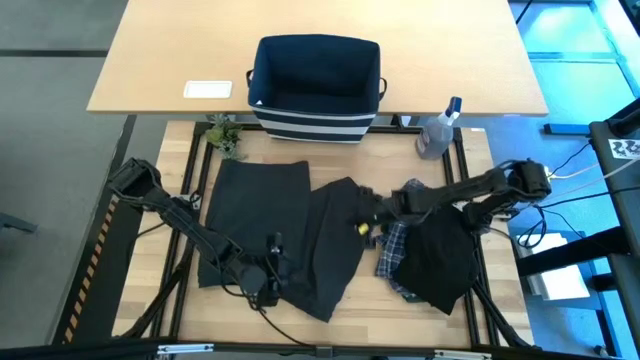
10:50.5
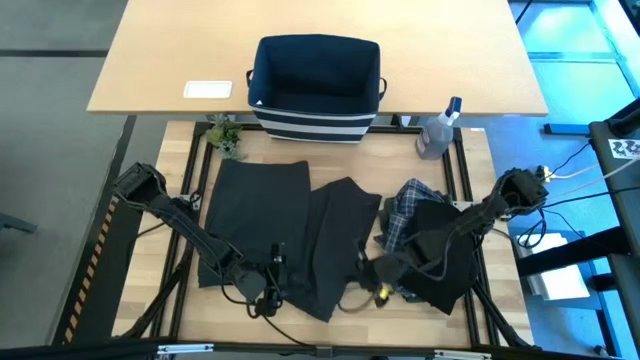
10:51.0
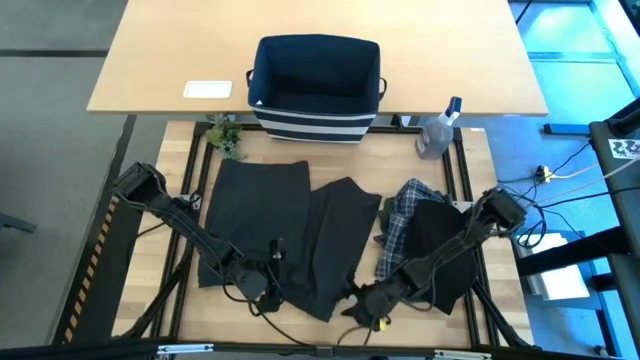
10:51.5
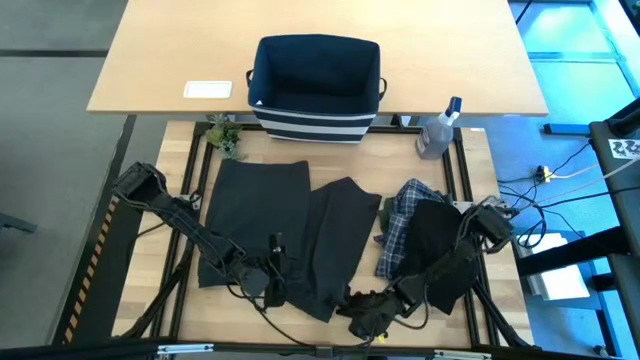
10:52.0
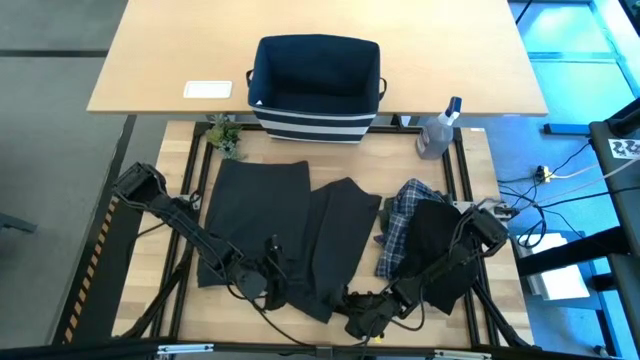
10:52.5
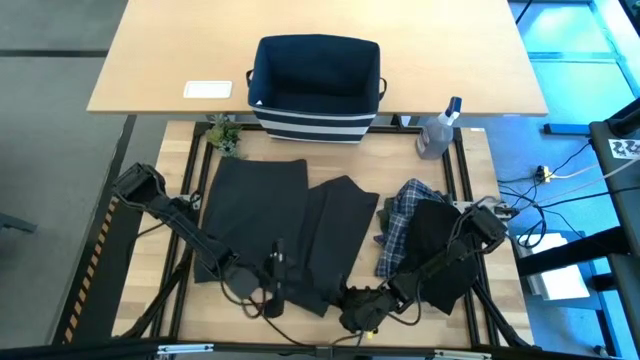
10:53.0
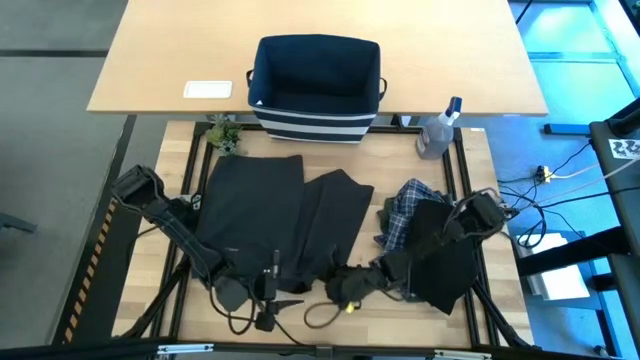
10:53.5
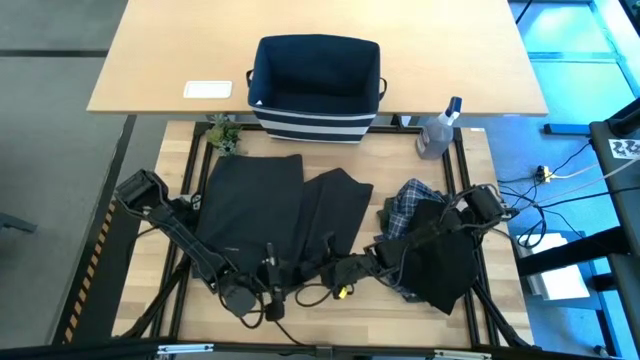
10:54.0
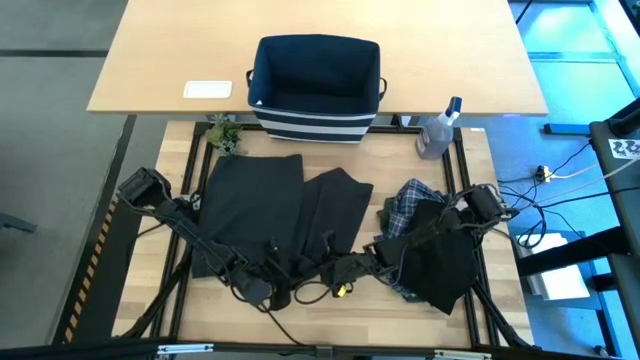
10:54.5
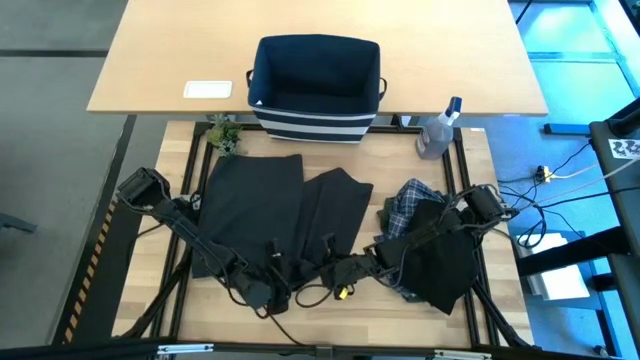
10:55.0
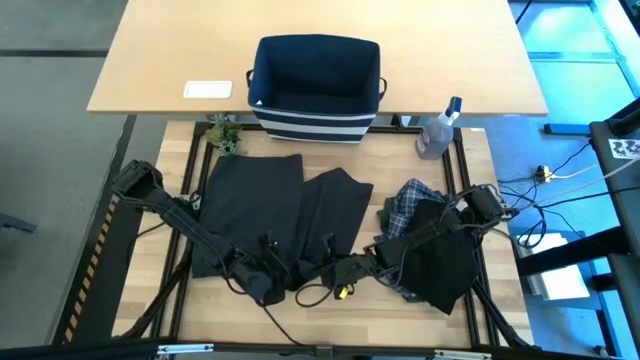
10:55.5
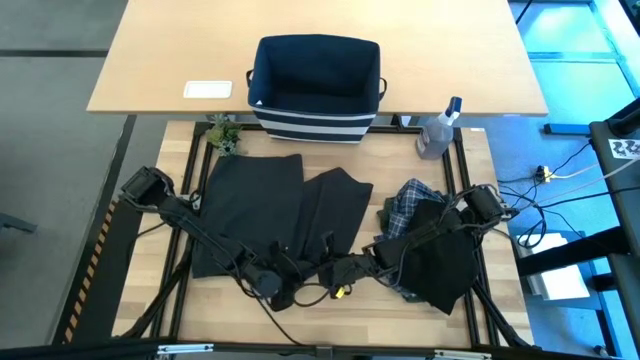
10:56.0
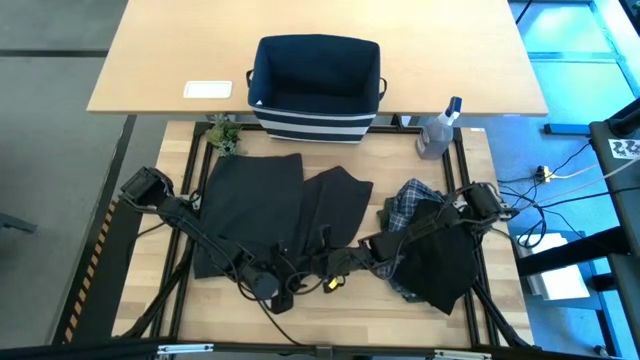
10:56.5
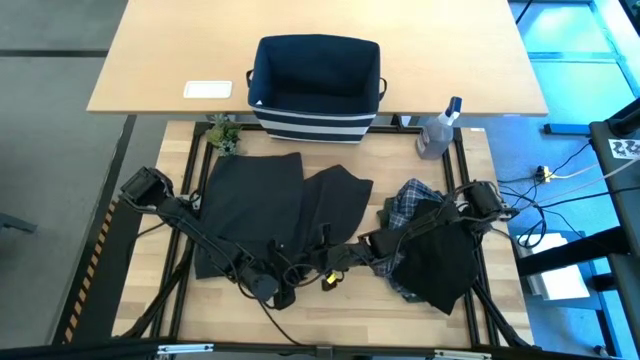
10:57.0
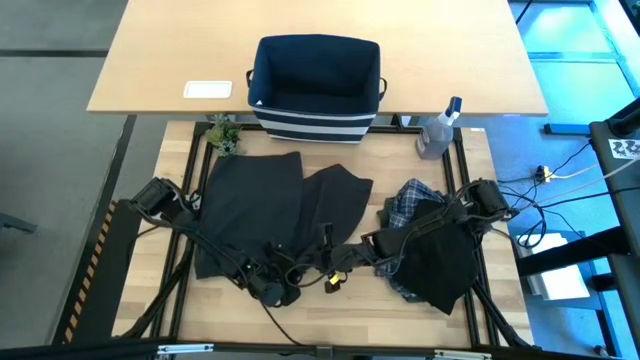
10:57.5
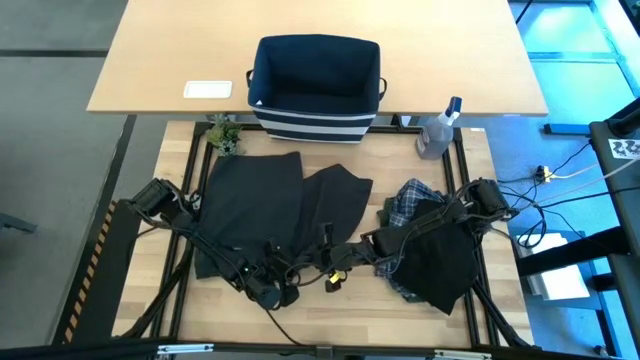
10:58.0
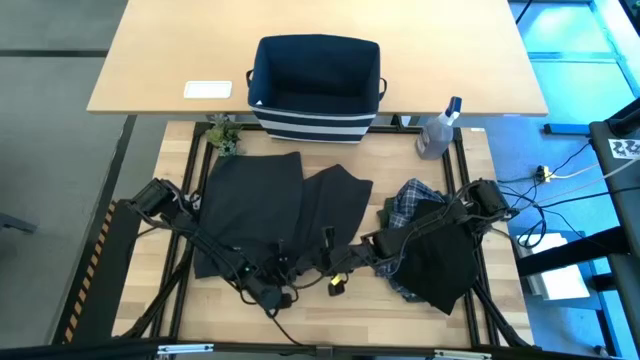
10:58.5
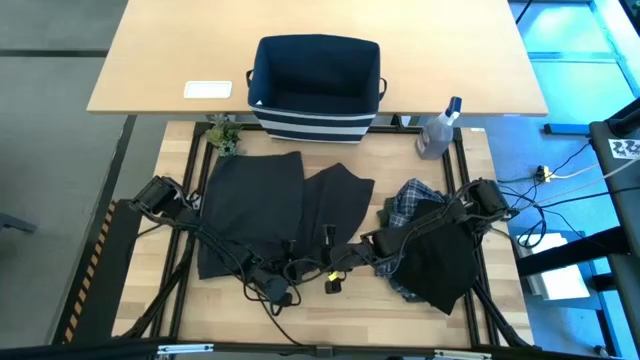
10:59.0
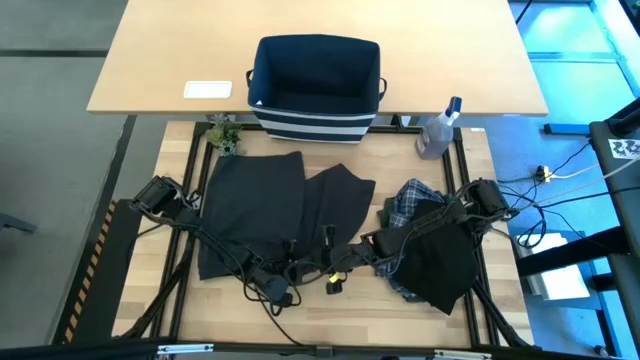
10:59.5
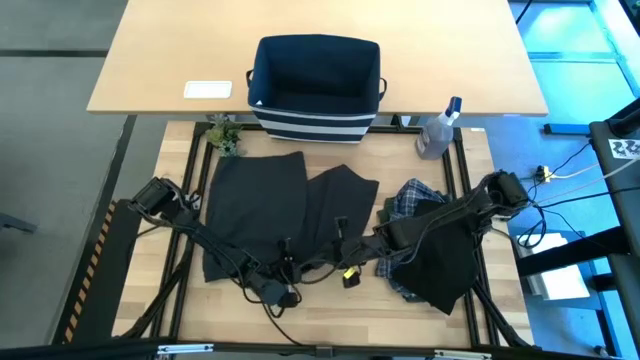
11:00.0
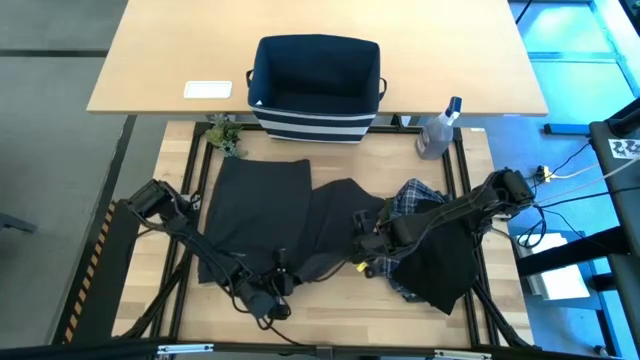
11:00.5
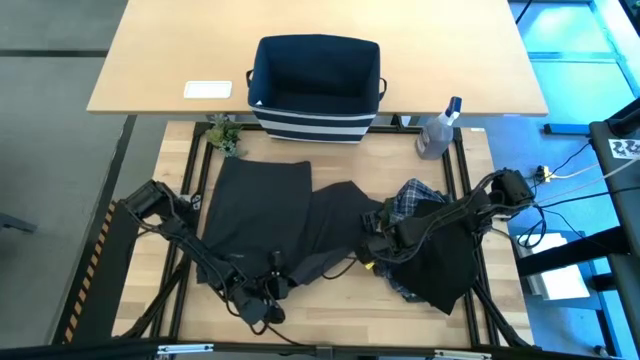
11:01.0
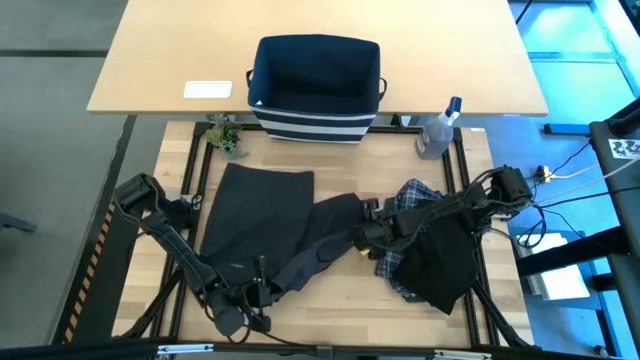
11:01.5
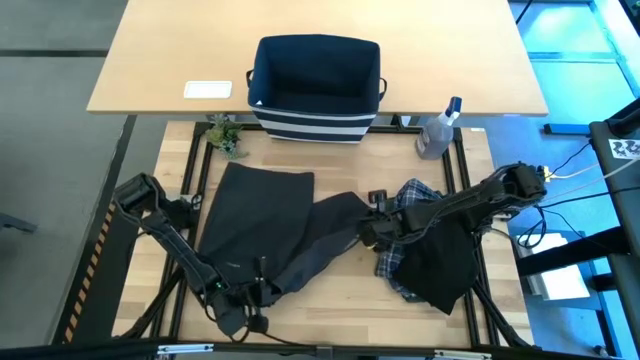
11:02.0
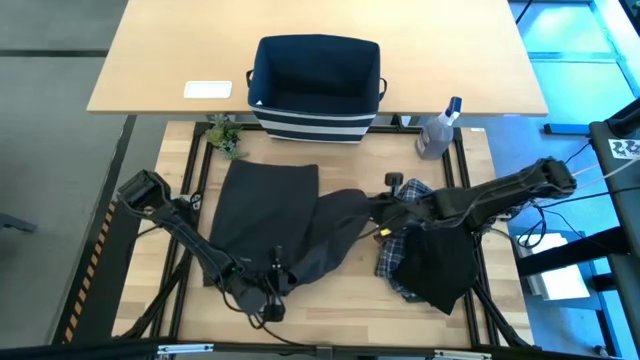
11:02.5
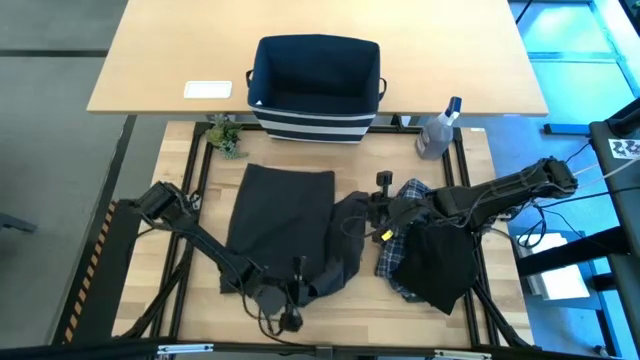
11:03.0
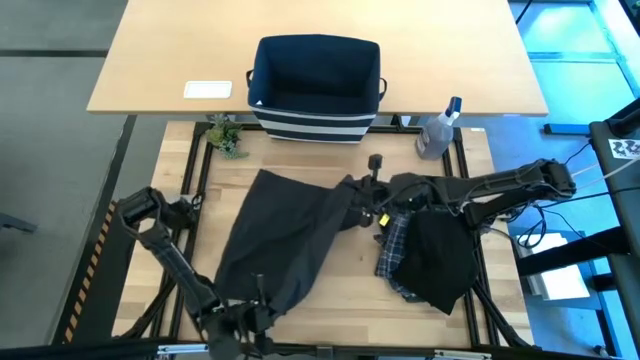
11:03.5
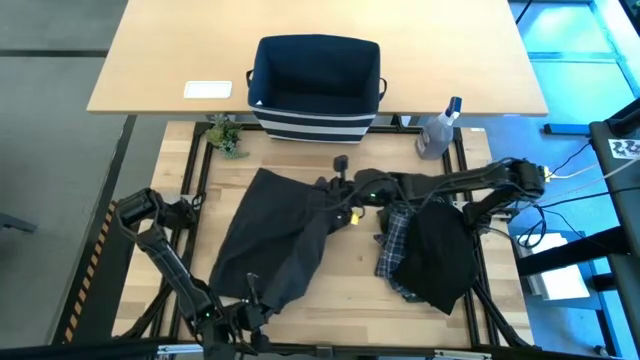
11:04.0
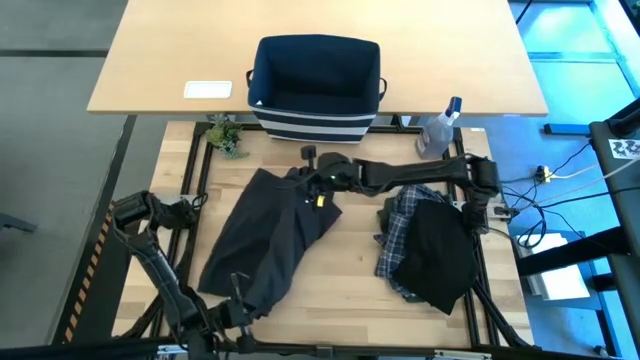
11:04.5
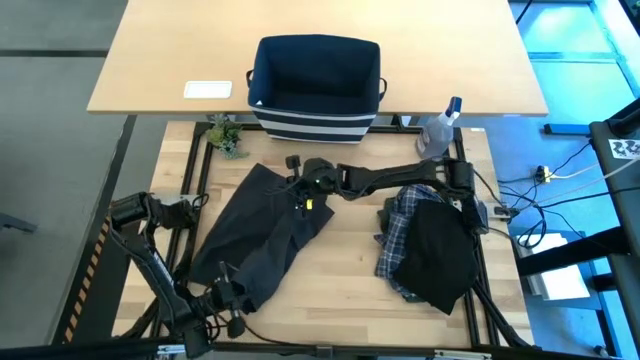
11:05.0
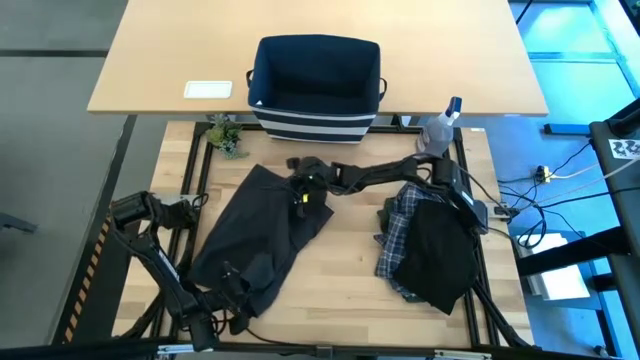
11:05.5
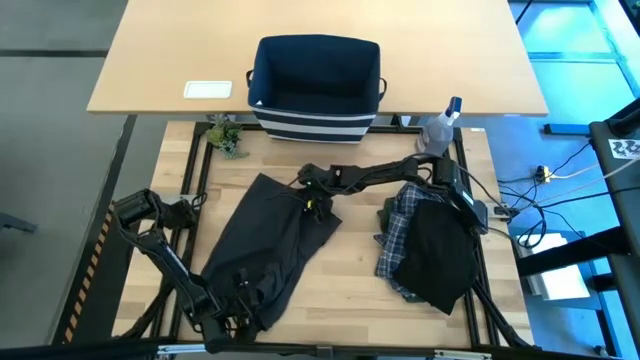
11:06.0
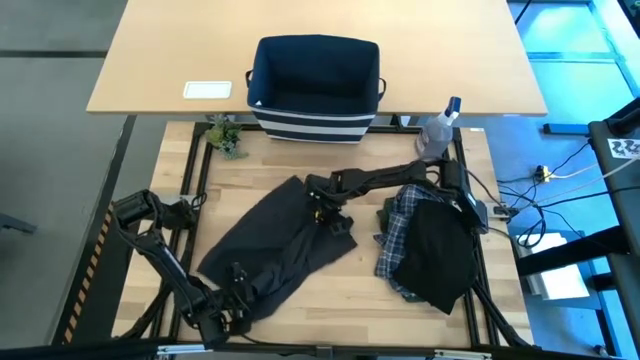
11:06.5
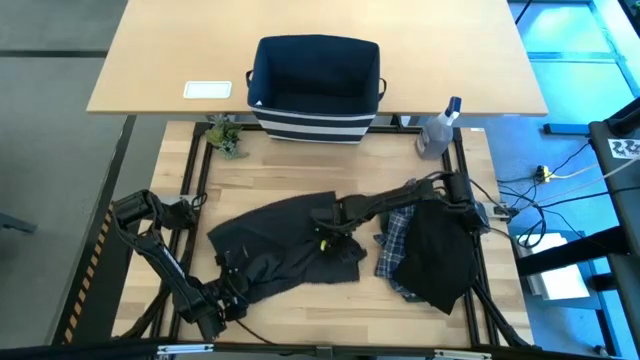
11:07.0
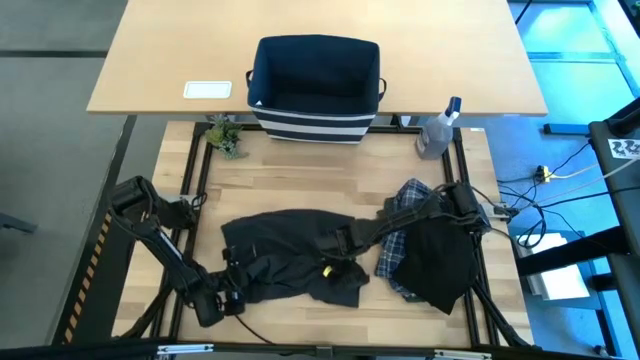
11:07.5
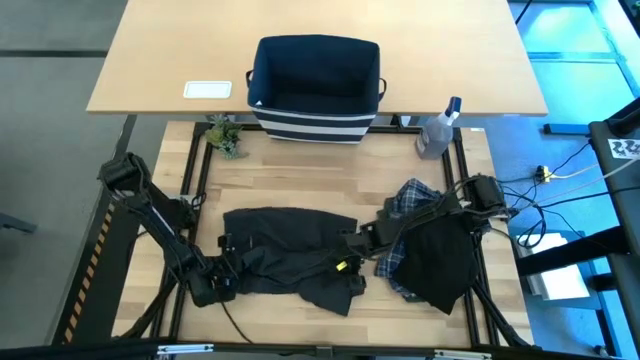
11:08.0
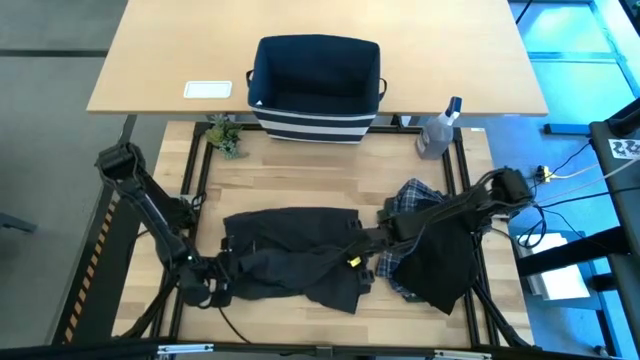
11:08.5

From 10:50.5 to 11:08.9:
Task: Fold Laundry from Bin
Fold the black shorts

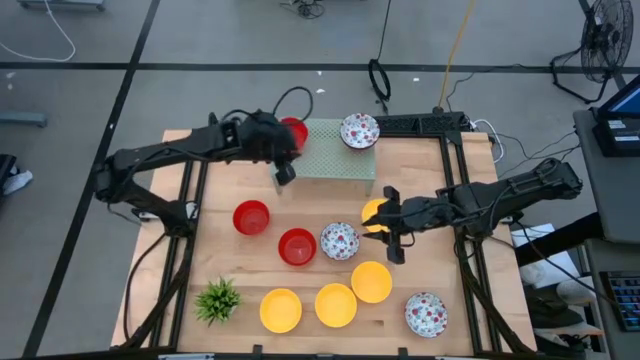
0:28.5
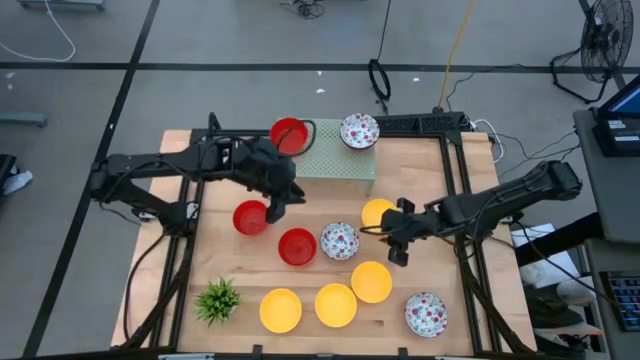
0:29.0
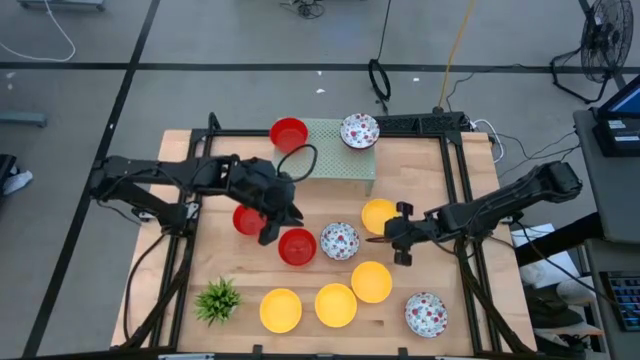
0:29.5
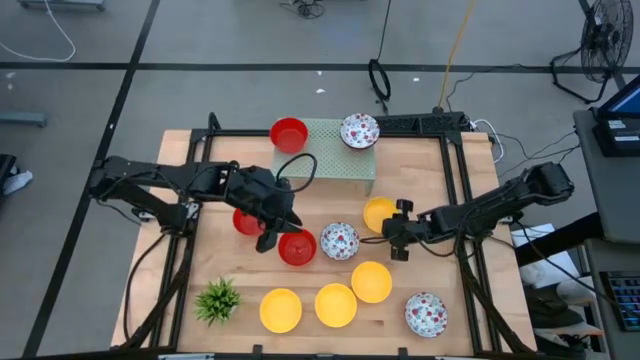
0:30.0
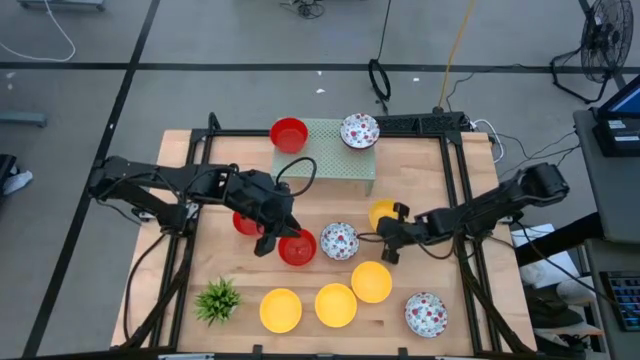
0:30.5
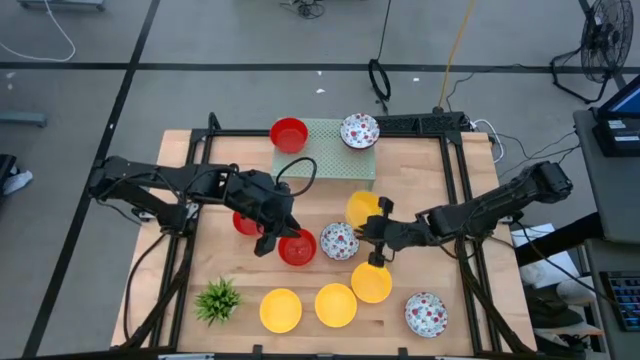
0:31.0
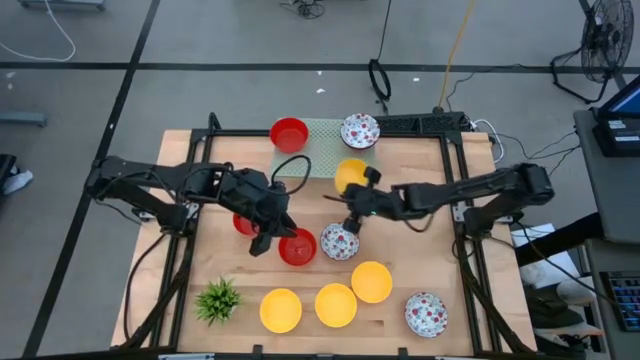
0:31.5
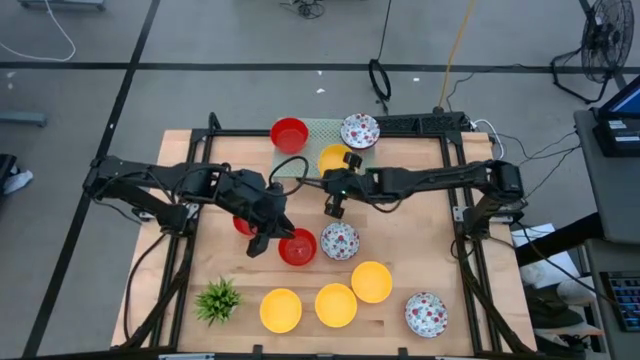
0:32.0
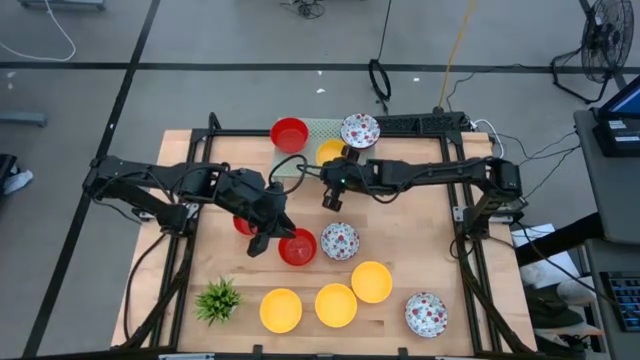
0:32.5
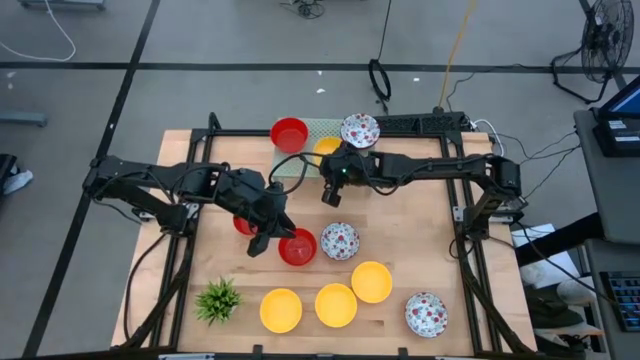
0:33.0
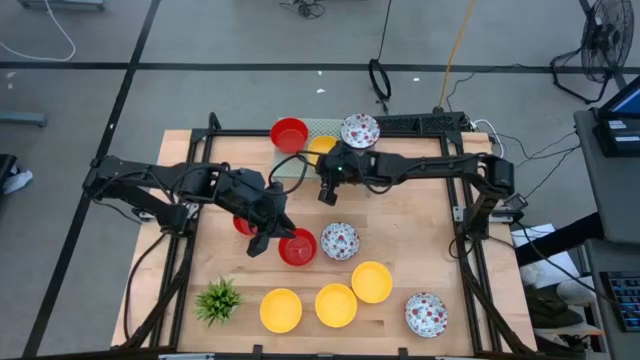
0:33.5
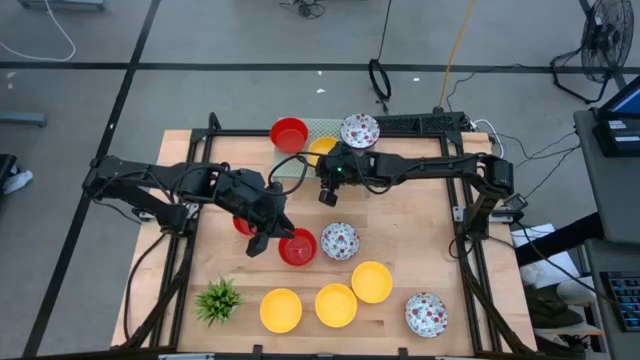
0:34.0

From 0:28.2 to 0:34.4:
Task: Pick & Place Mini bowls
Put the yellow bowl on the shelf
